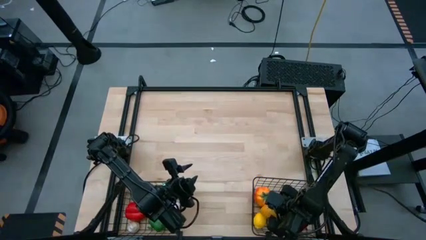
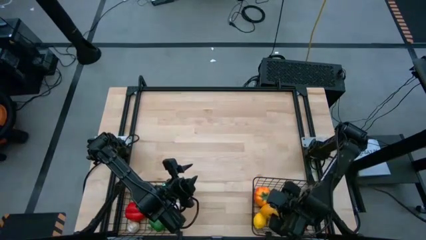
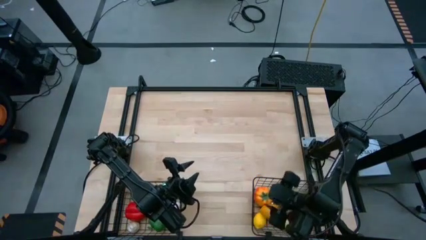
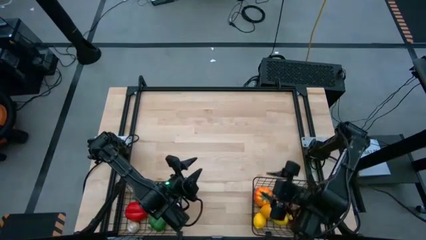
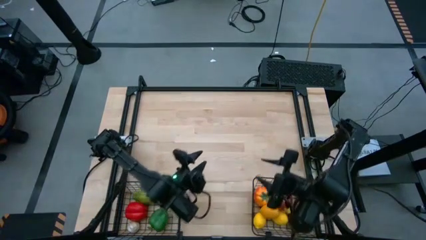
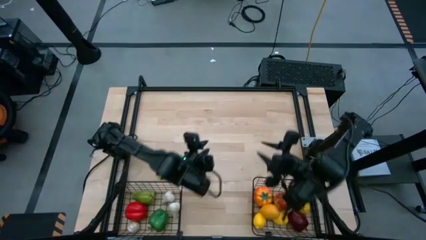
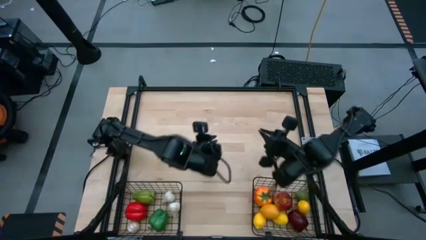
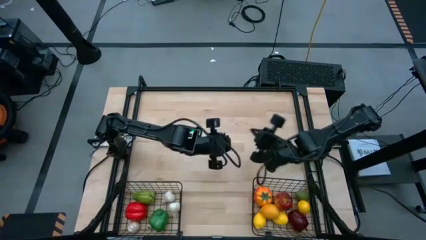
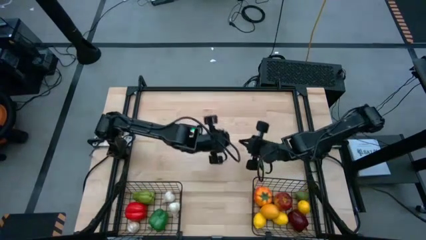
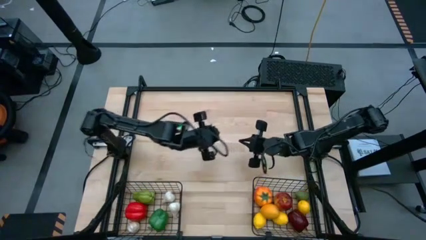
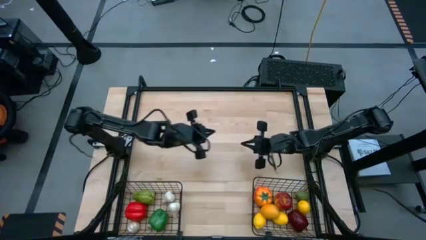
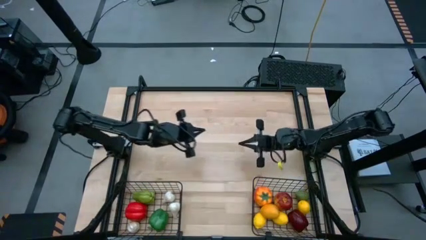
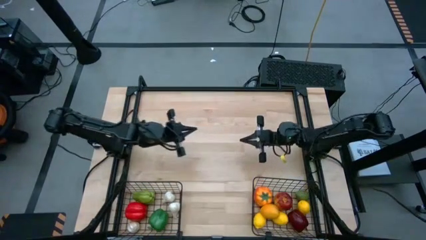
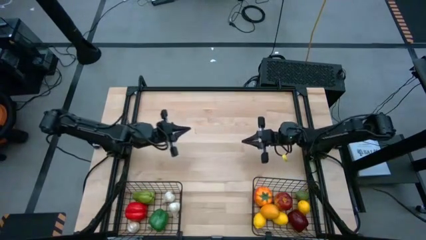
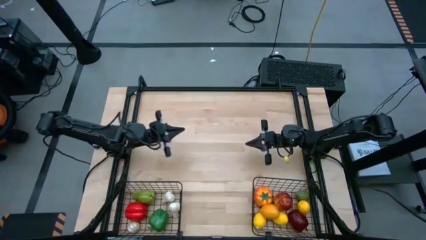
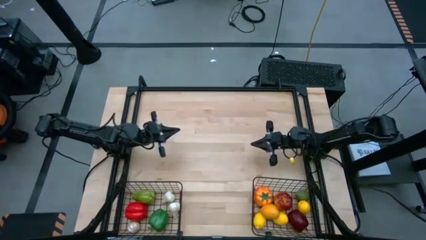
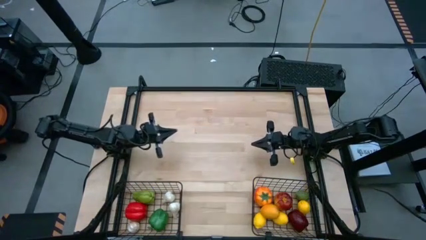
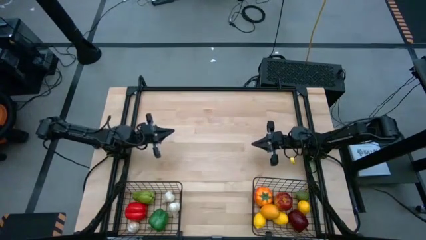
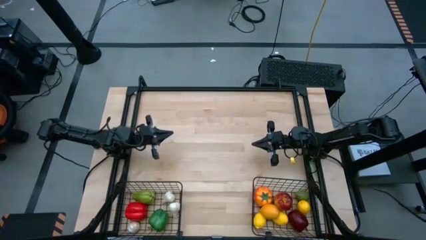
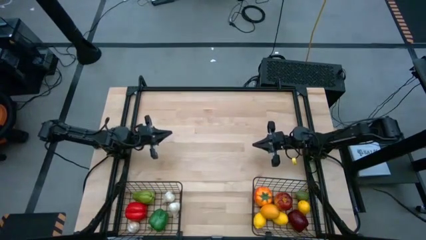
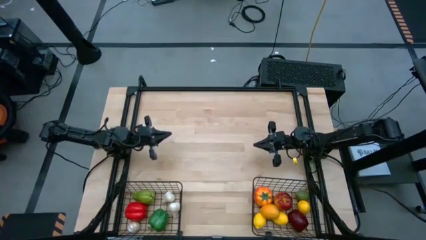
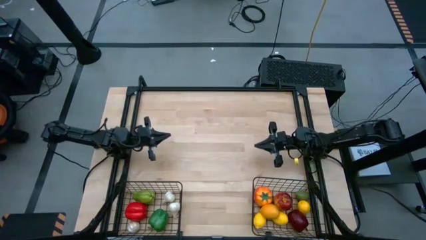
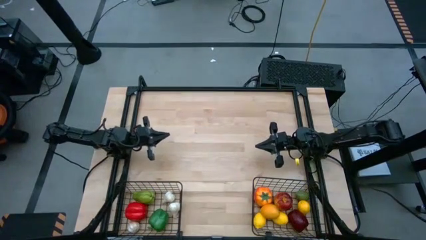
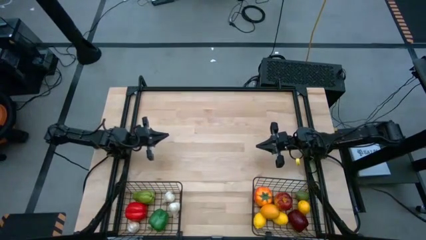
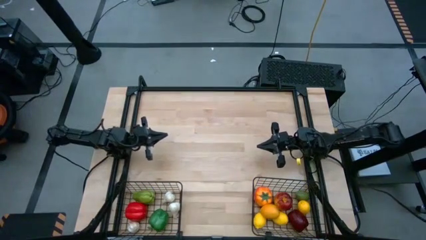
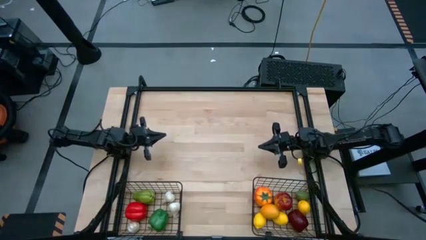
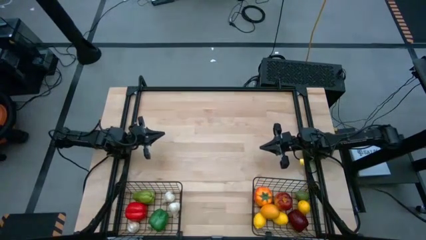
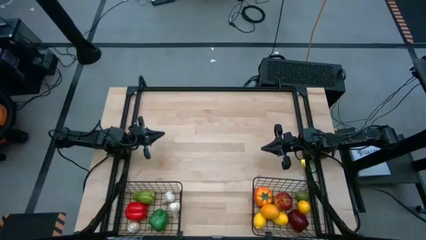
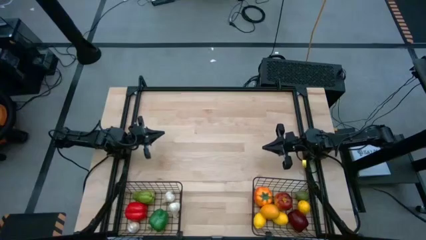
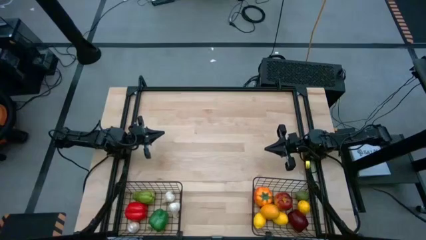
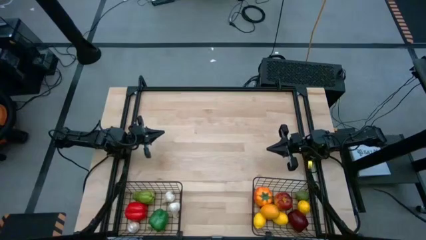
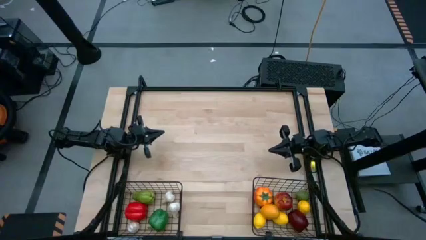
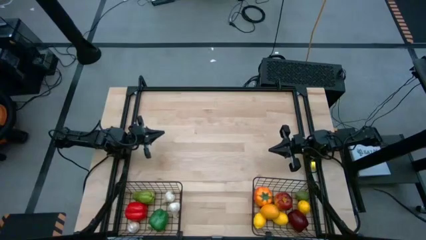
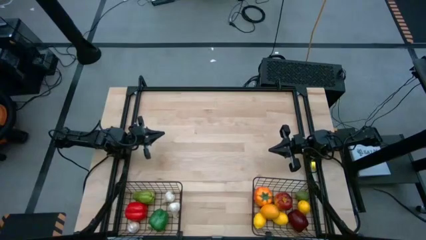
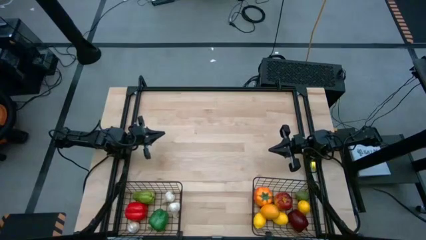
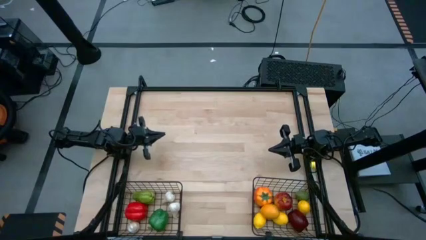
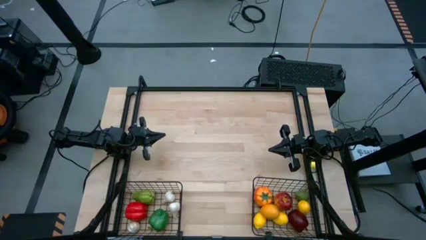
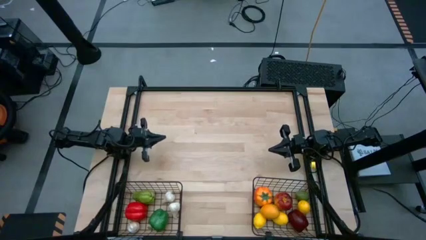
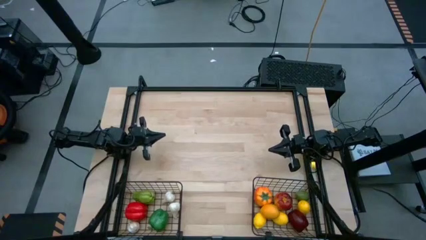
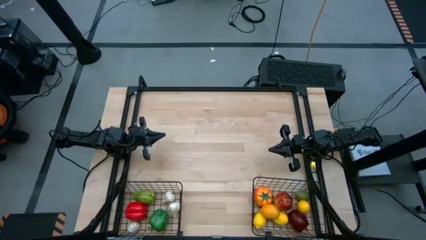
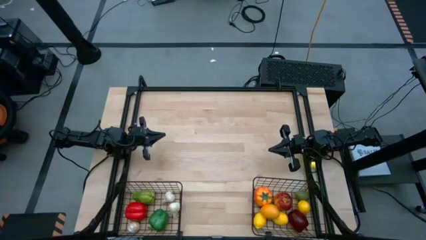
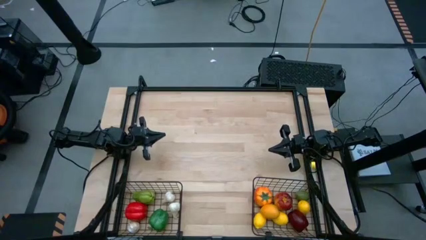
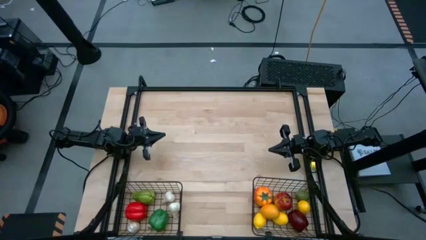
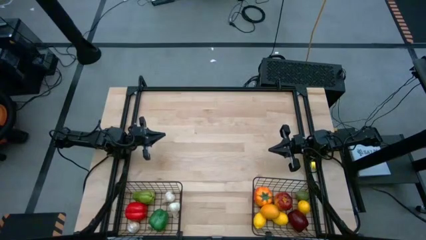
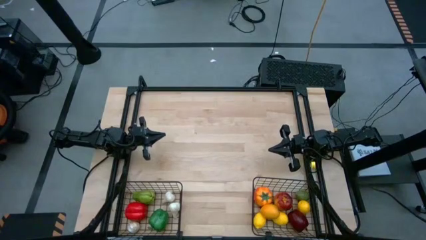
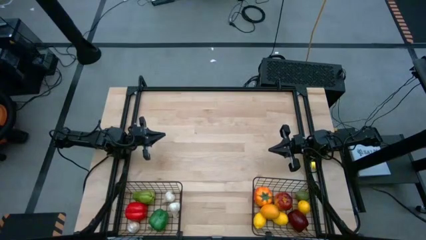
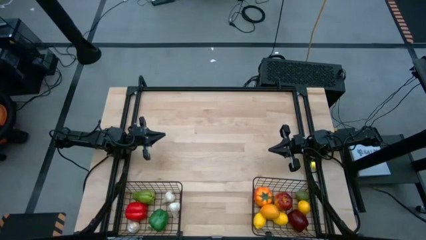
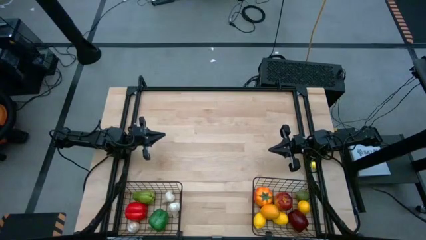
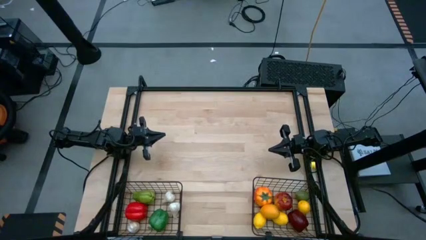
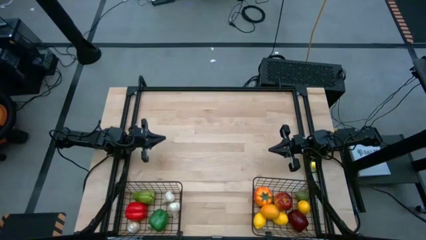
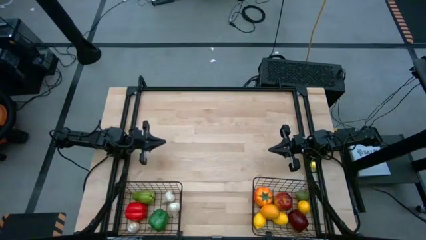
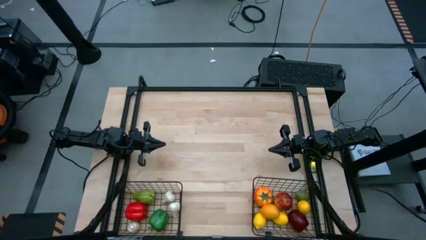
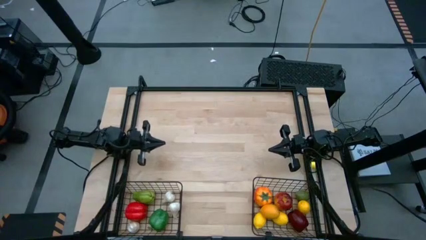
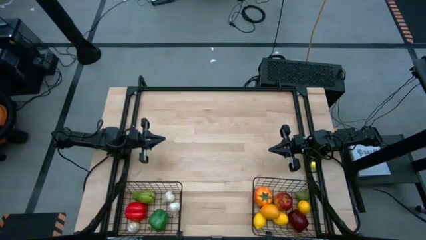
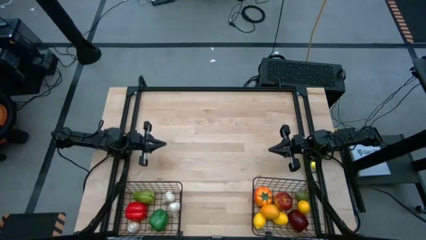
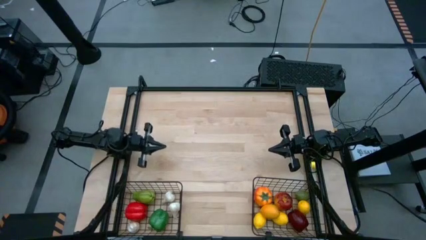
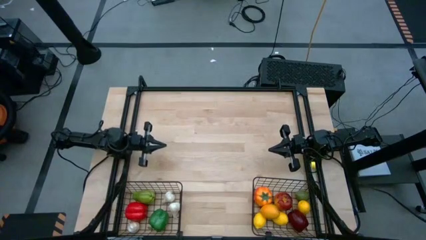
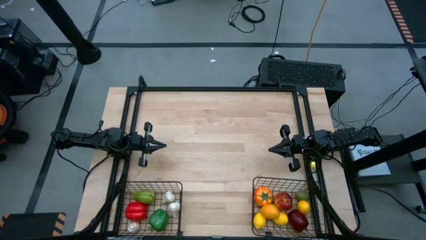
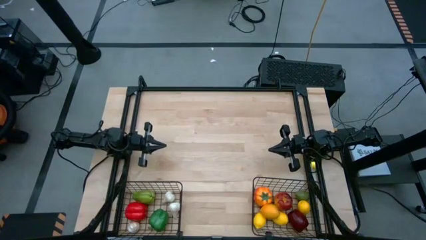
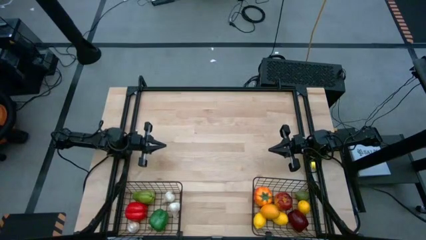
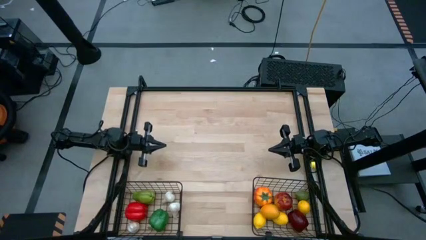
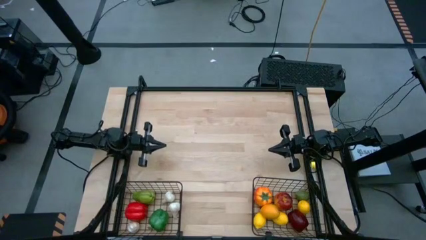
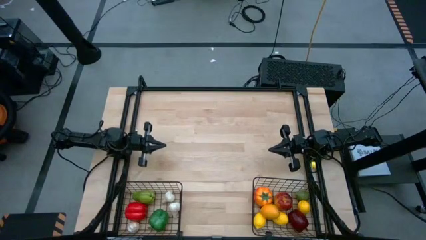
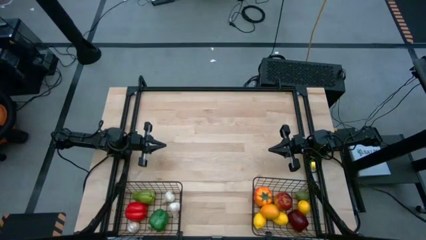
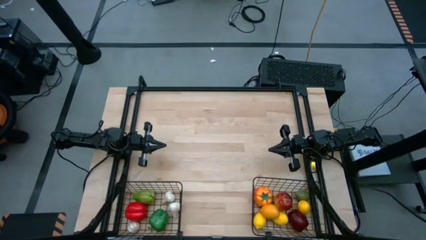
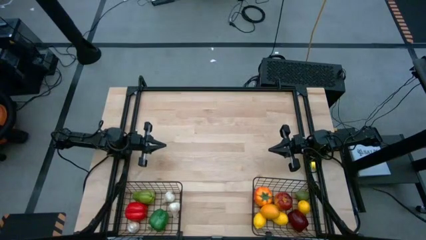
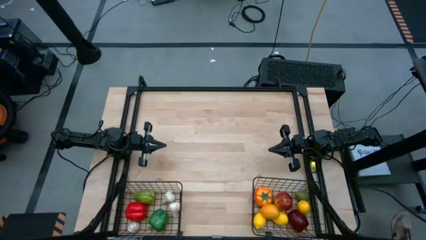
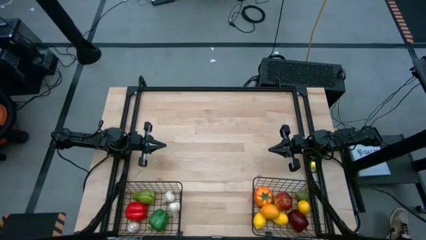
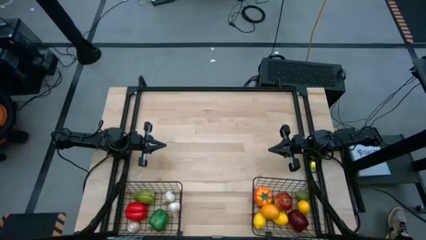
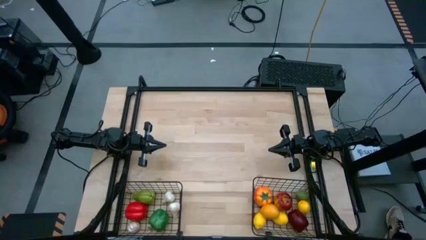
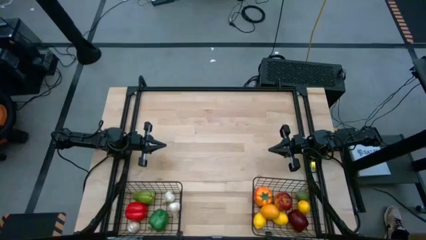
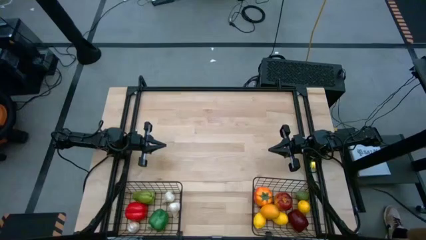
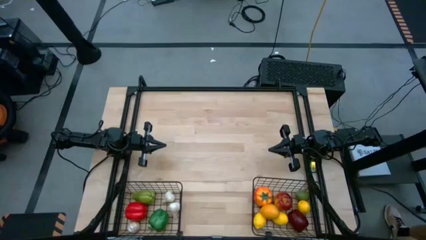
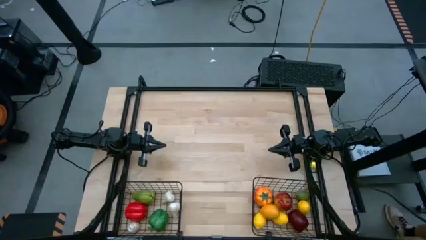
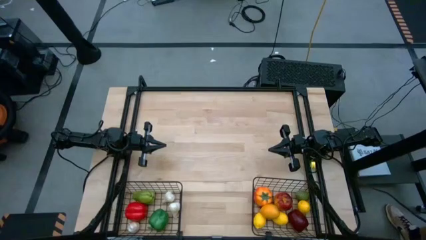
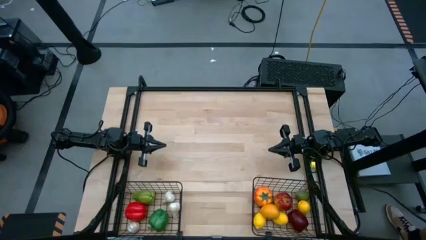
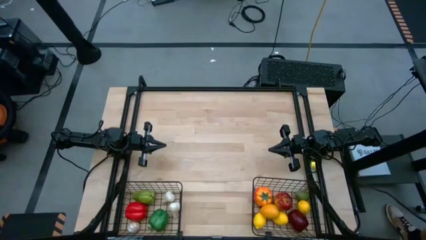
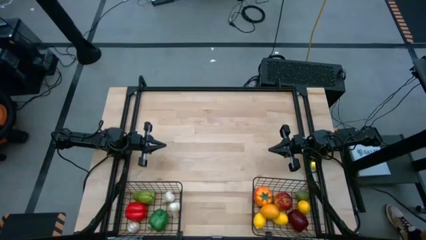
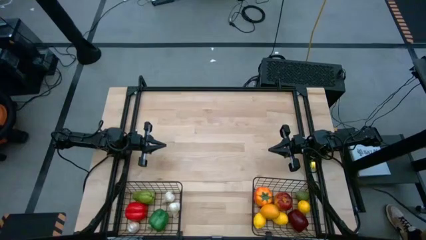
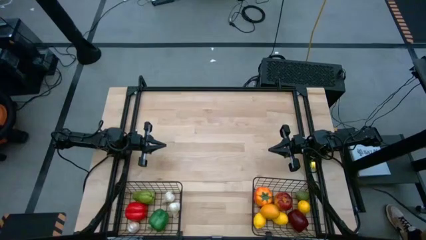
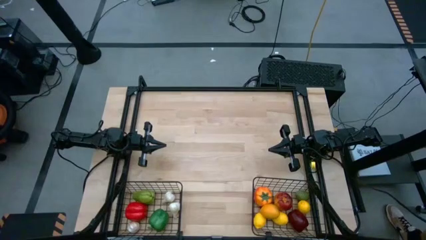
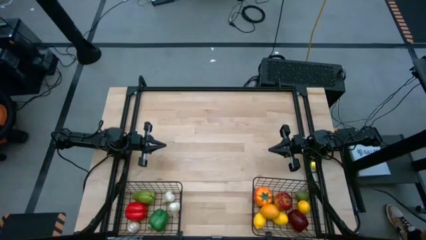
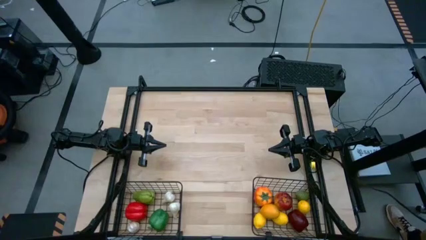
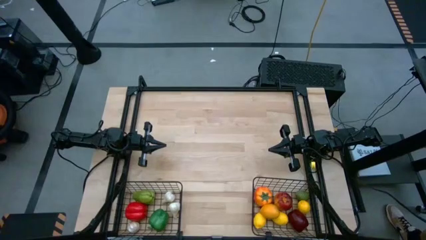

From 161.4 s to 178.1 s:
Task: Sort produce into baskets
Return to Home Position
